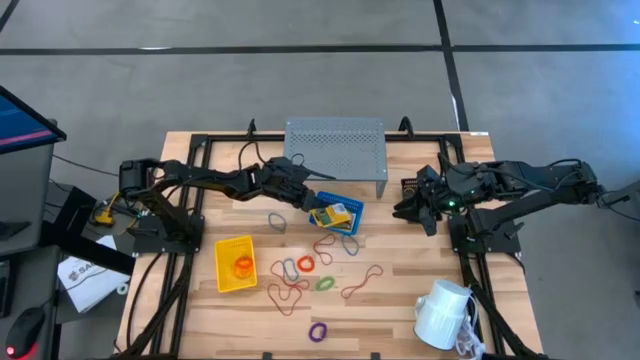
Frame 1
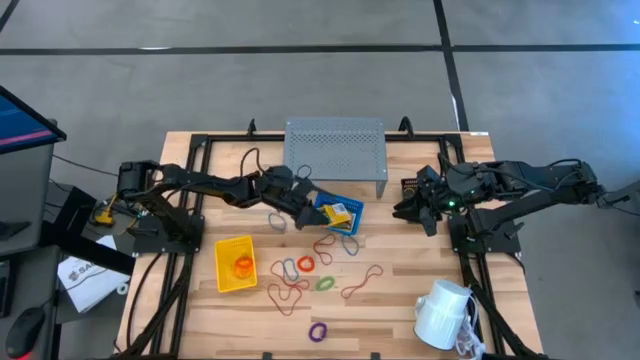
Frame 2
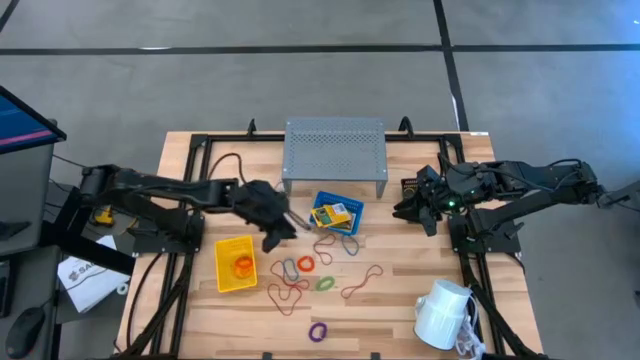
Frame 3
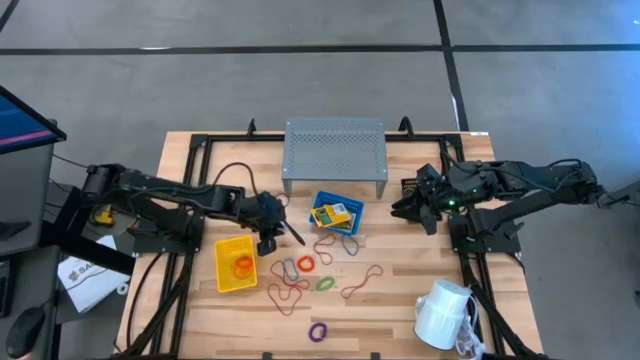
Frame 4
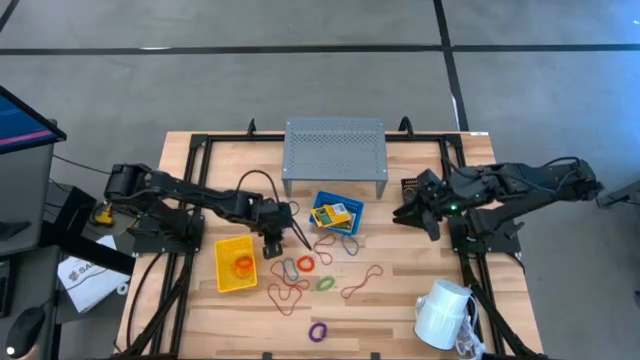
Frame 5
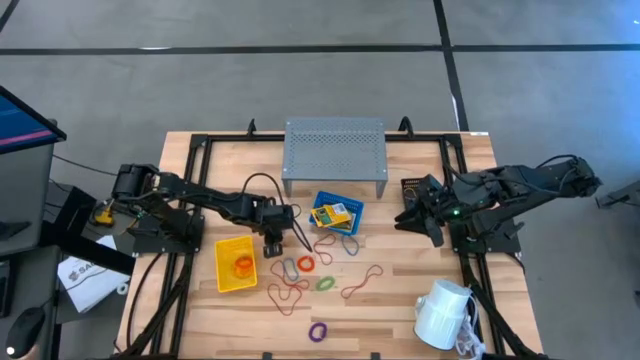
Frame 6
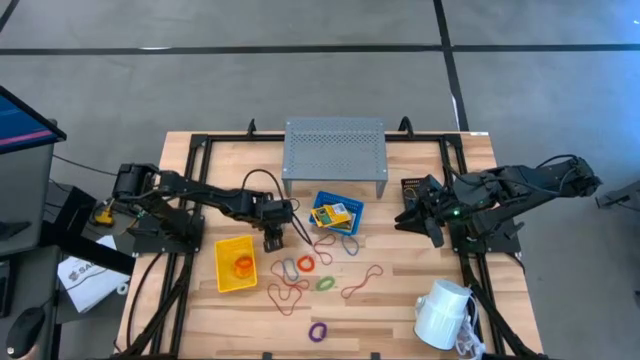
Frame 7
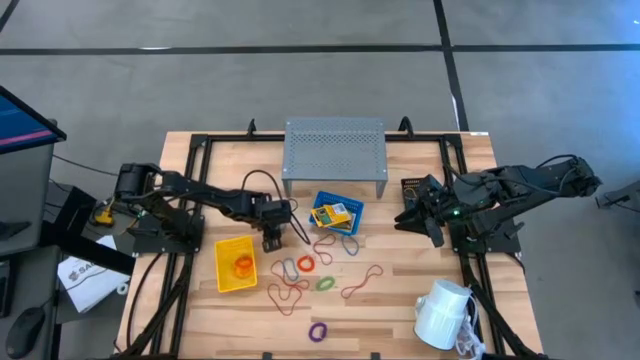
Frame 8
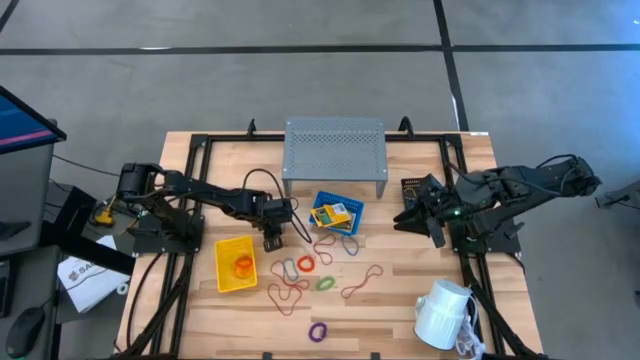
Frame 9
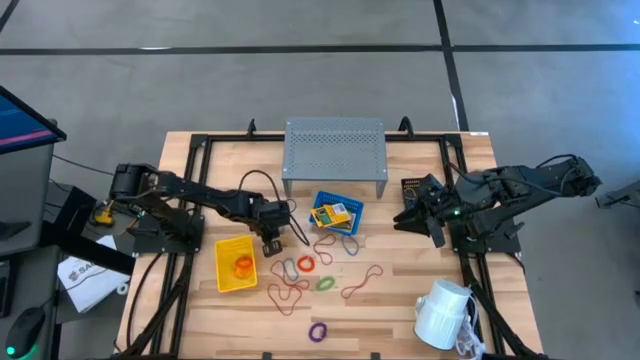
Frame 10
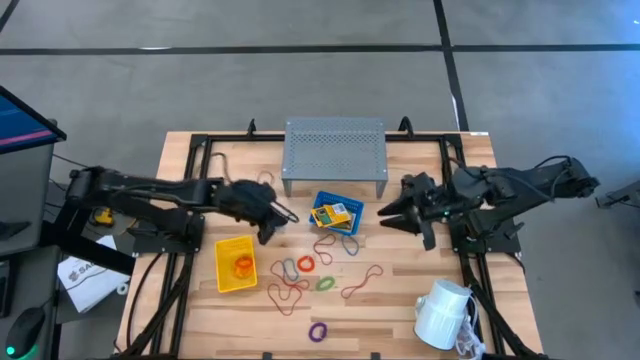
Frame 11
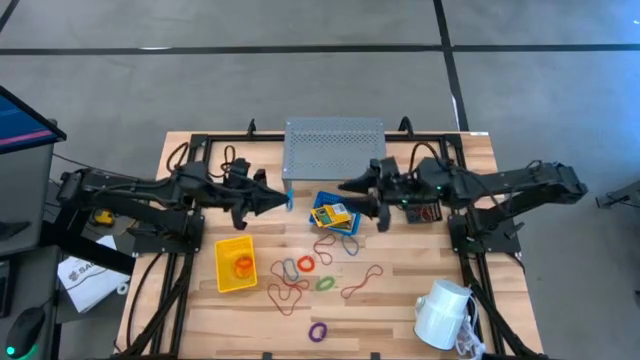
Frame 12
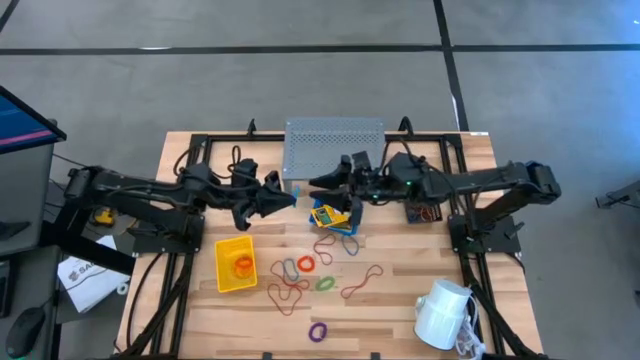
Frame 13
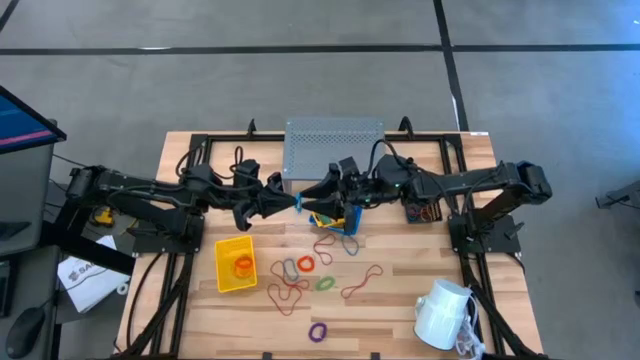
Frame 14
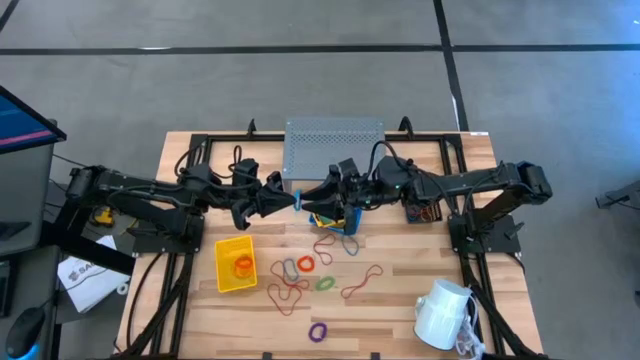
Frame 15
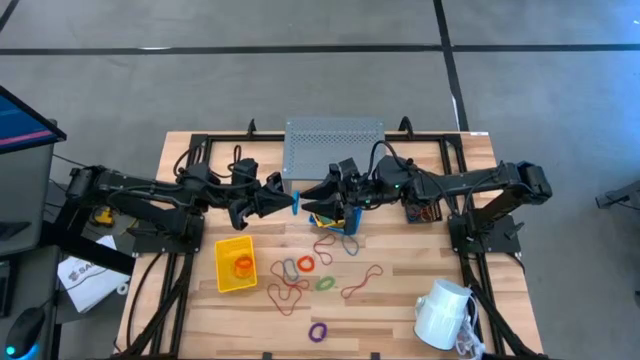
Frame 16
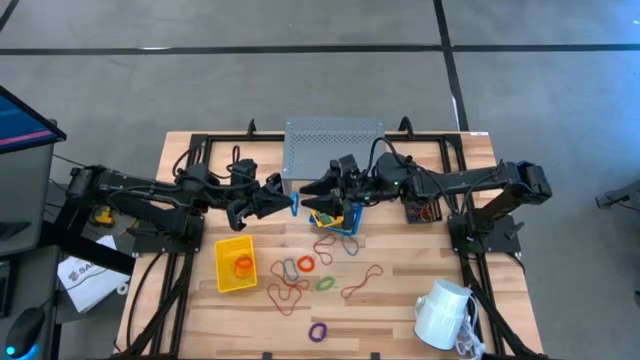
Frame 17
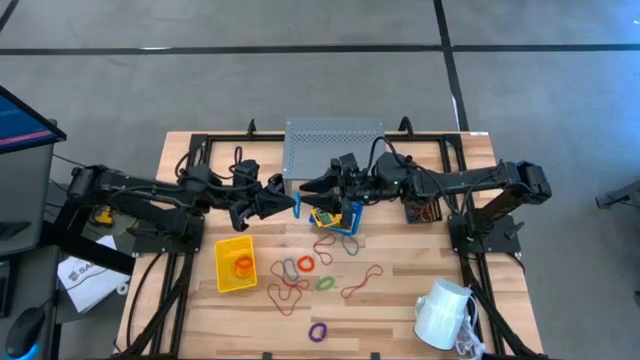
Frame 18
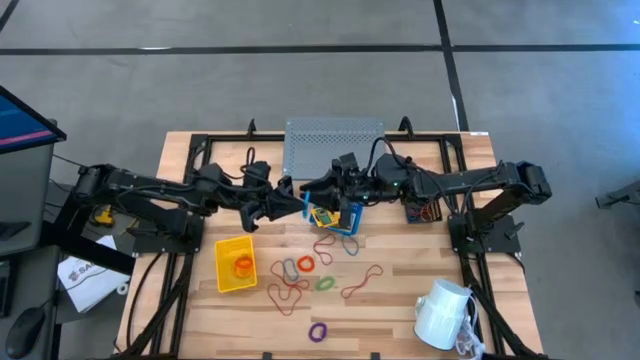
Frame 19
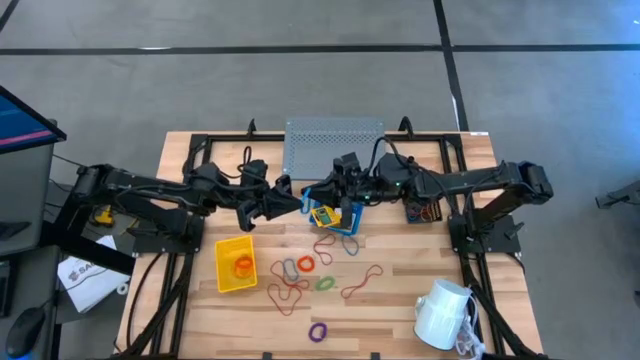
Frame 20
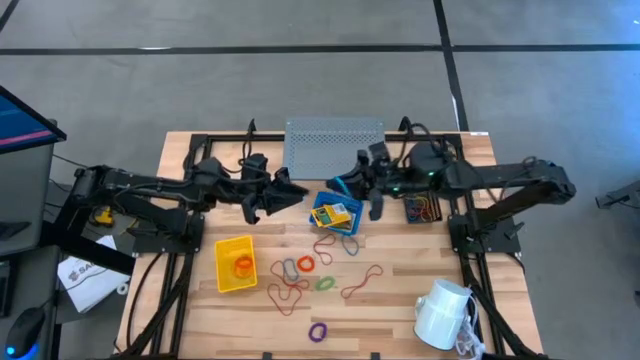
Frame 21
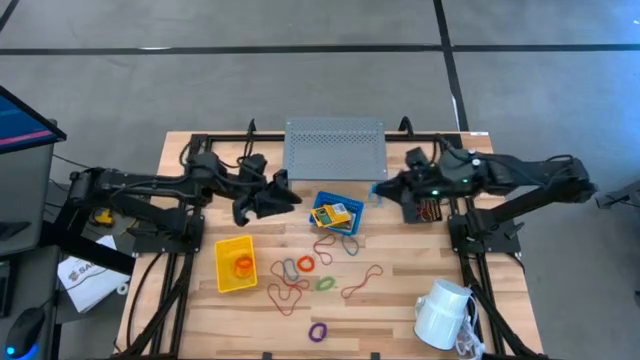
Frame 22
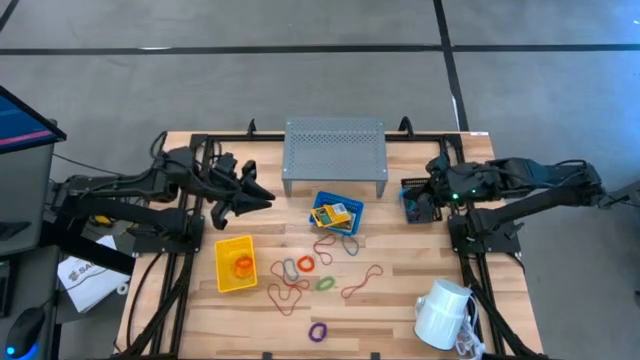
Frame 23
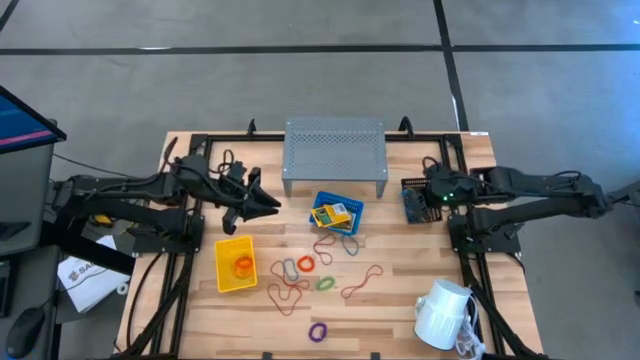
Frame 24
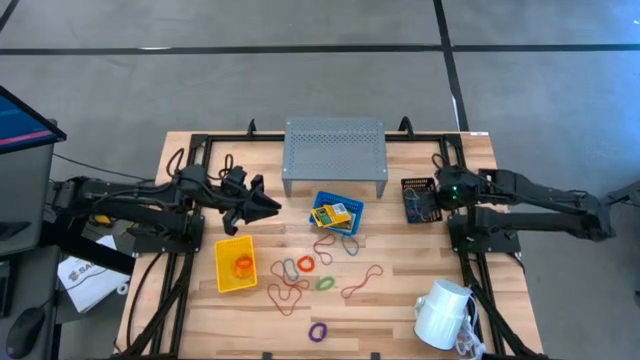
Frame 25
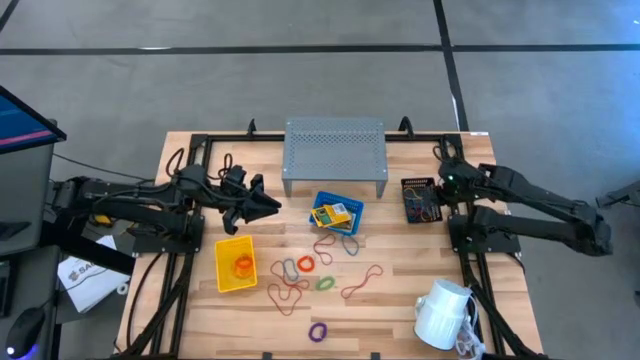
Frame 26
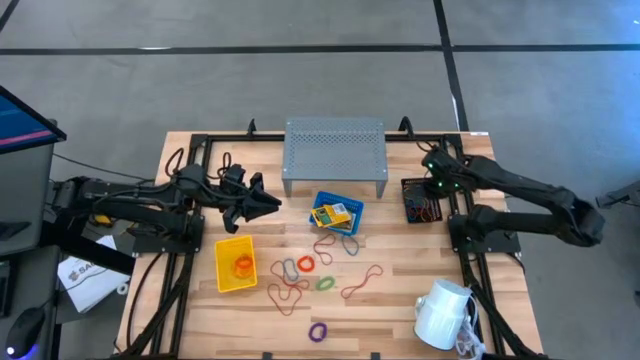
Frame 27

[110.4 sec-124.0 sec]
Task: Pick & Place Office Desk Supplies
Put the blue rubber band into the black bin

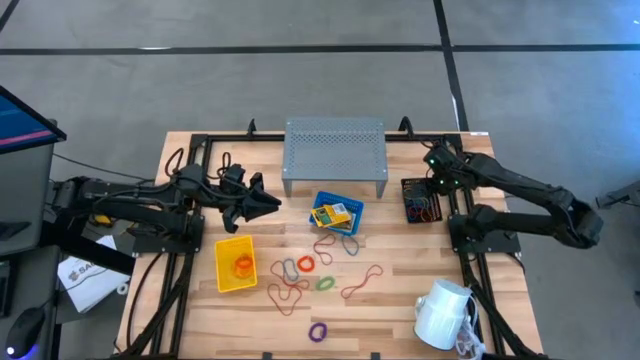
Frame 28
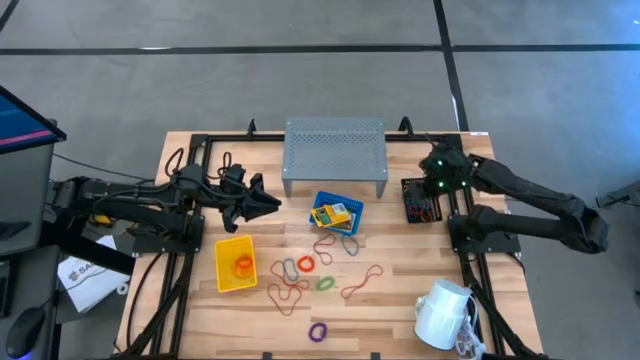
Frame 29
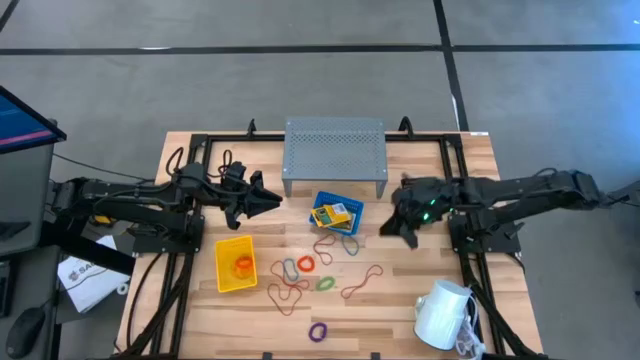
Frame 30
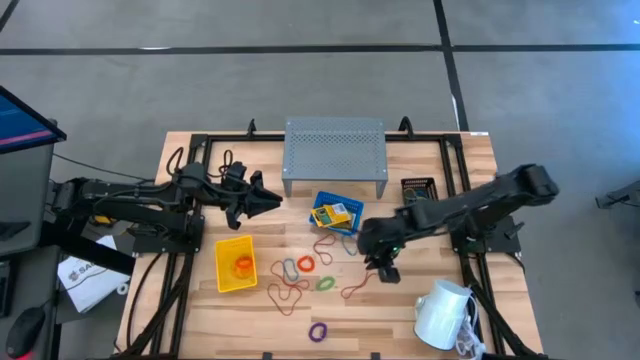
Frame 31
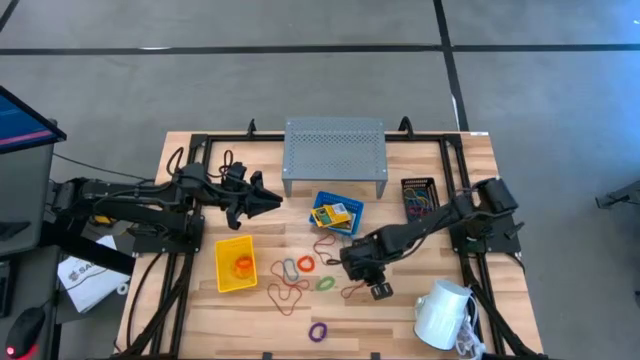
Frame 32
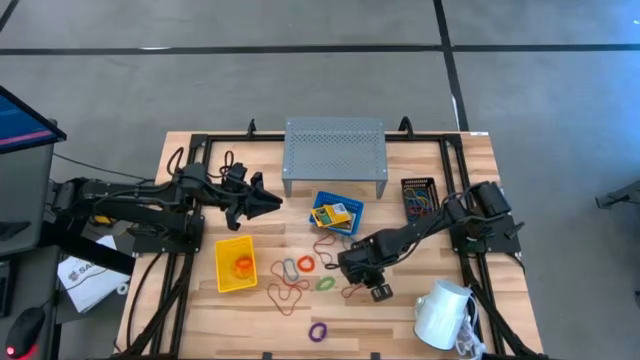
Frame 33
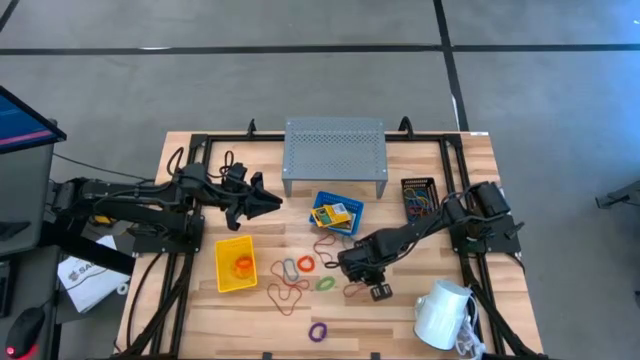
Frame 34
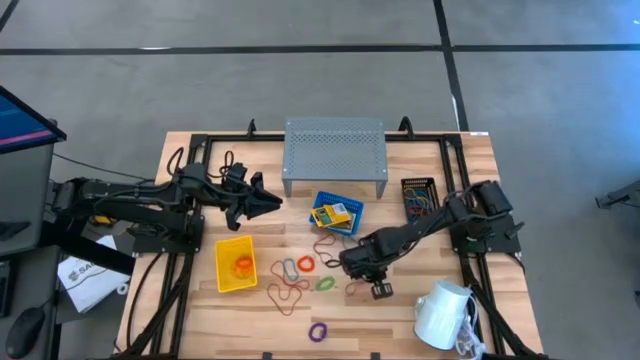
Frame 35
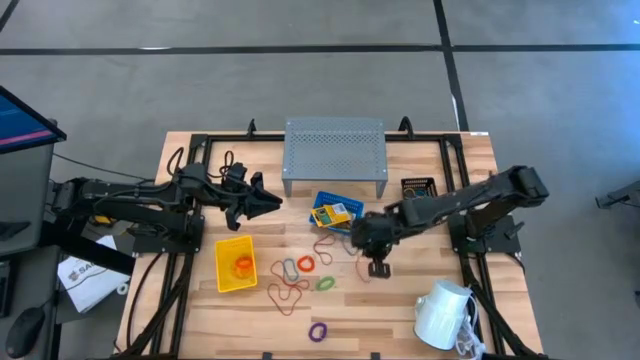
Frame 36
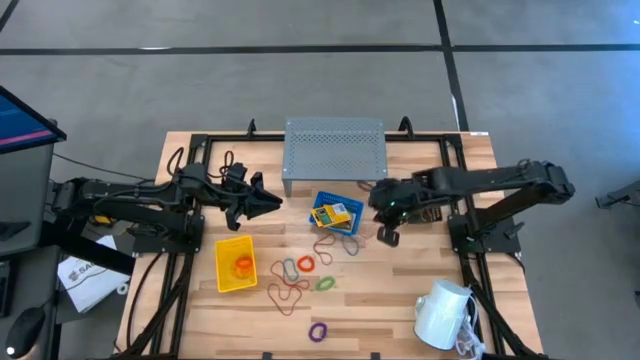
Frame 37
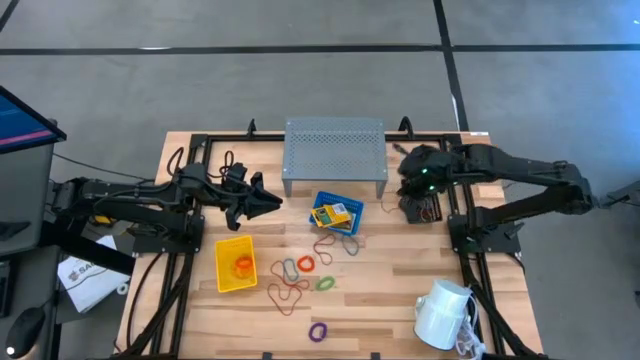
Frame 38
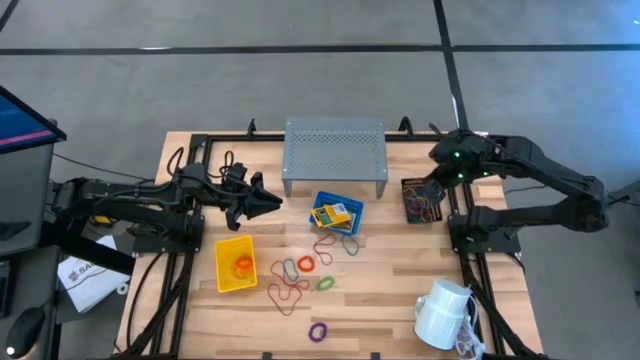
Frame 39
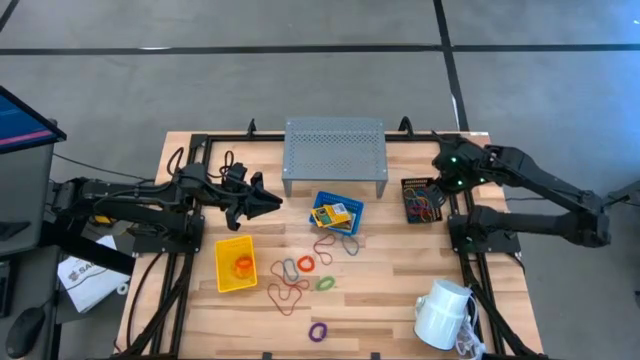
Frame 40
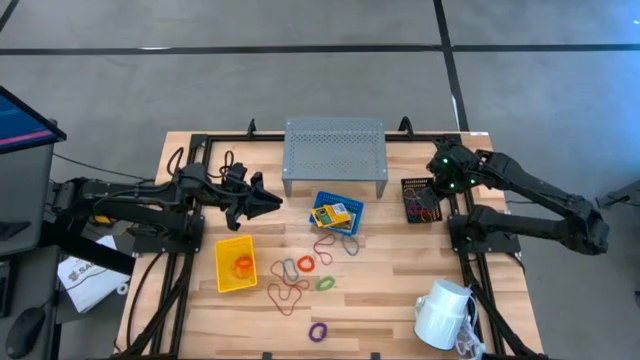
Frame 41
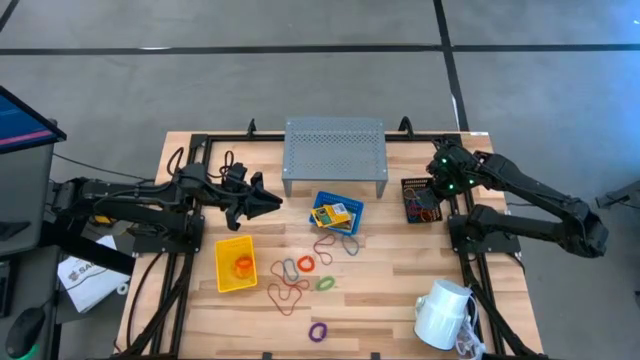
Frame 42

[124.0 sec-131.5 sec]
Put the red rubber band into the black bin
